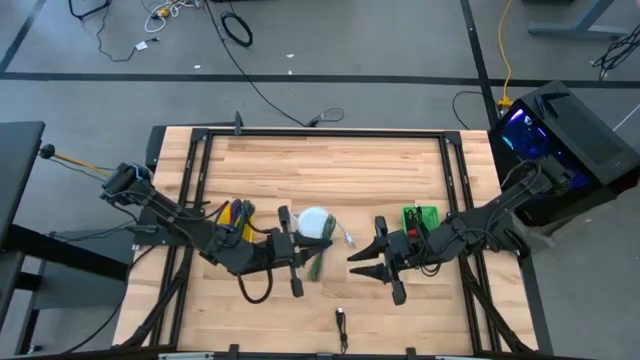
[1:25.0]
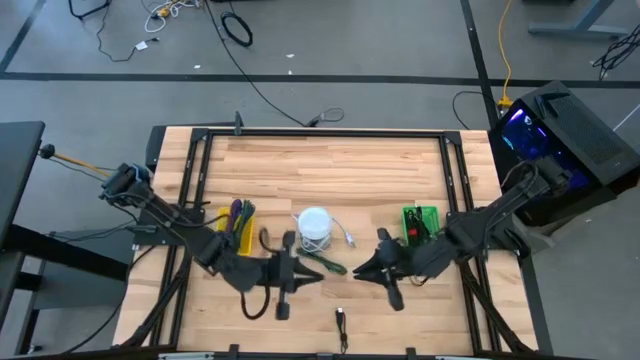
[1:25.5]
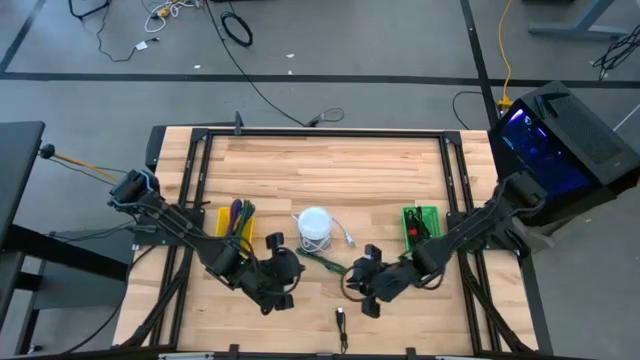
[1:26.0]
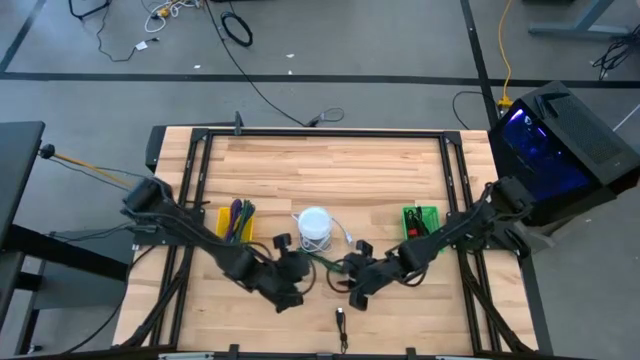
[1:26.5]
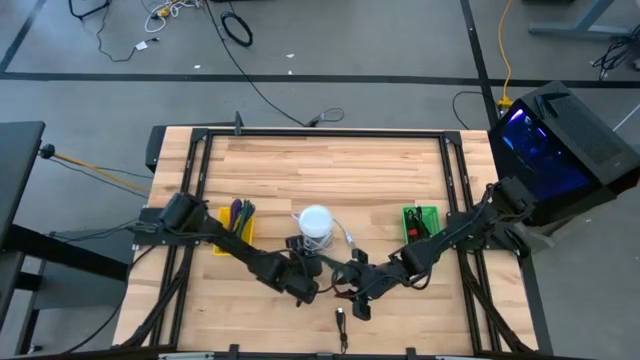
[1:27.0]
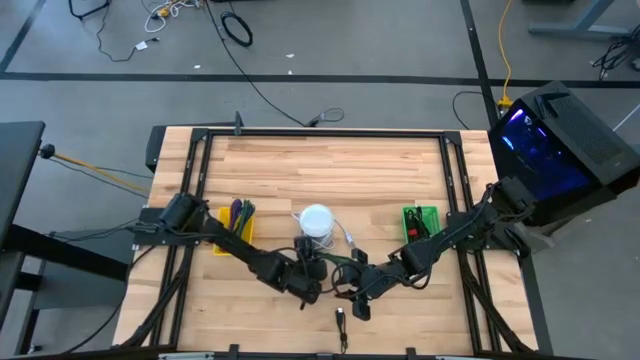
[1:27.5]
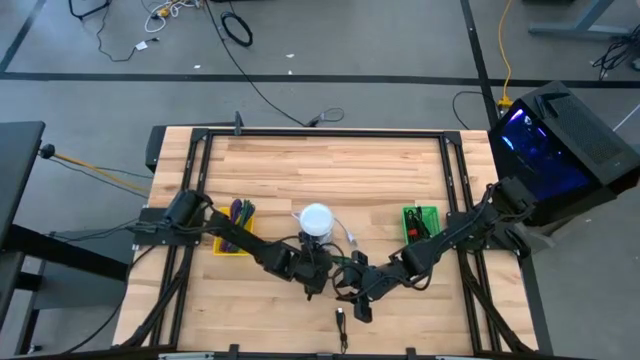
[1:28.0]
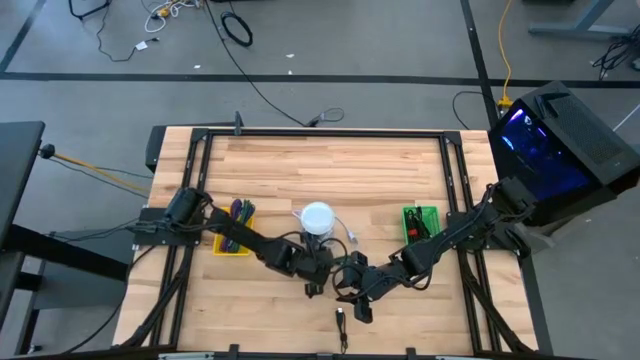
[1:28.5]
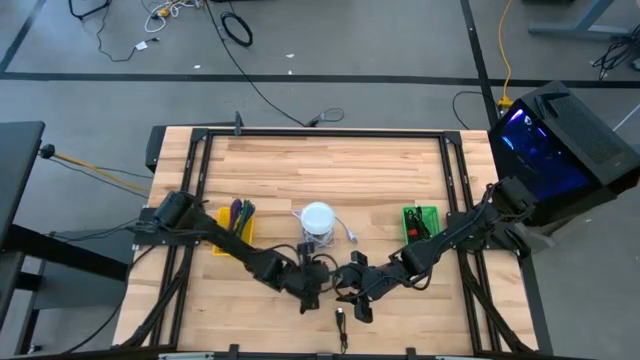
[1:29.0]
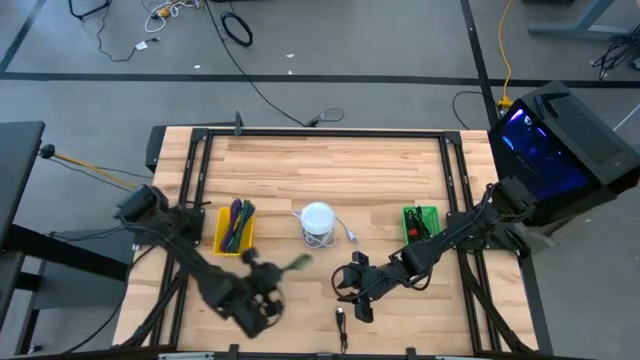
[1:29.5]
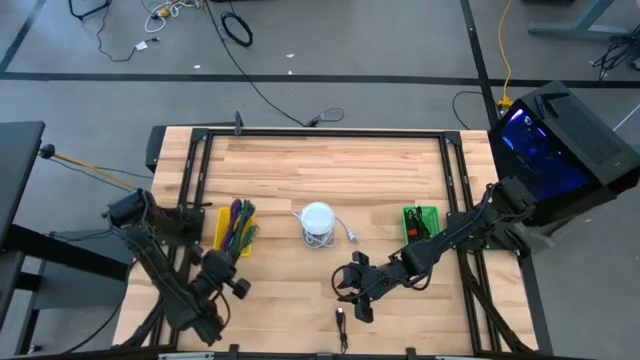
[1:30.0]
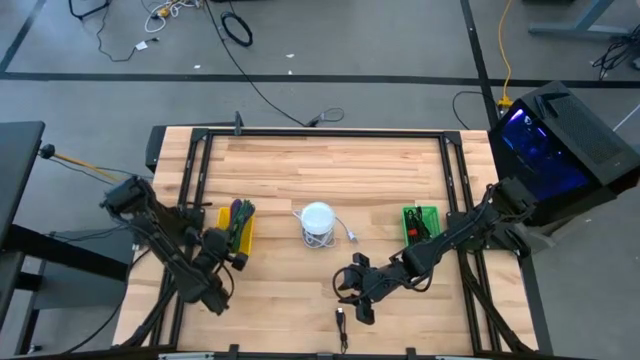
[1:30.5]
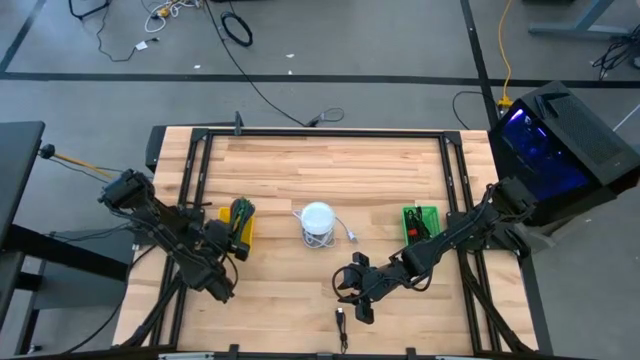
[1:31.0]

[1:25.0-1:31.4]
Task: Pick & Place USB Port
Put the green charger cable into the yellow bin

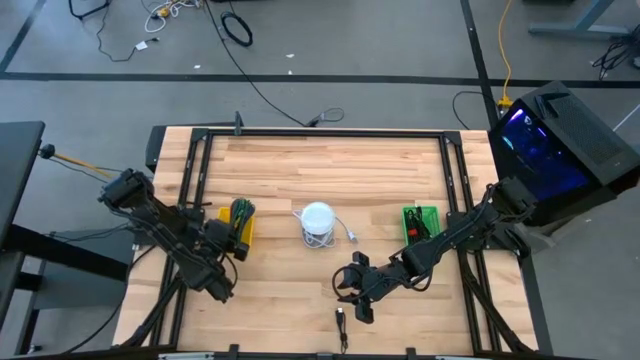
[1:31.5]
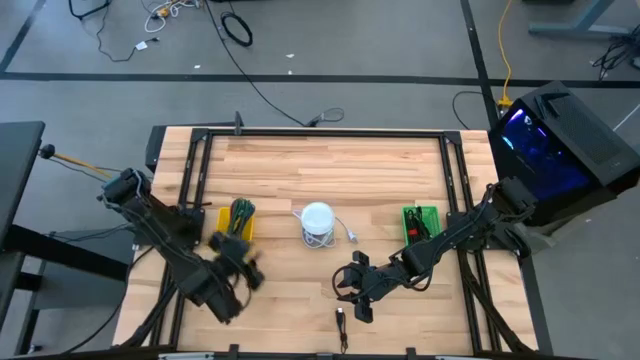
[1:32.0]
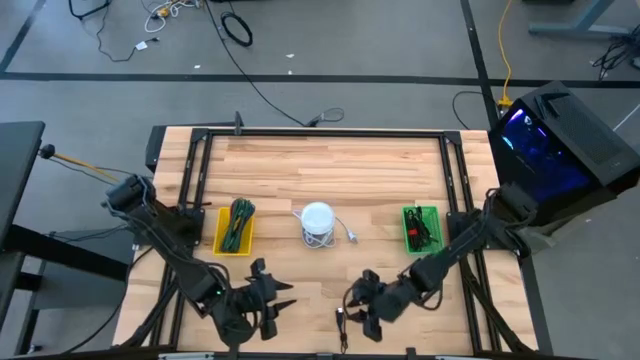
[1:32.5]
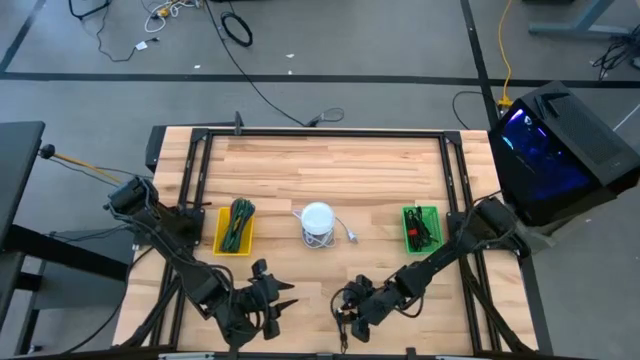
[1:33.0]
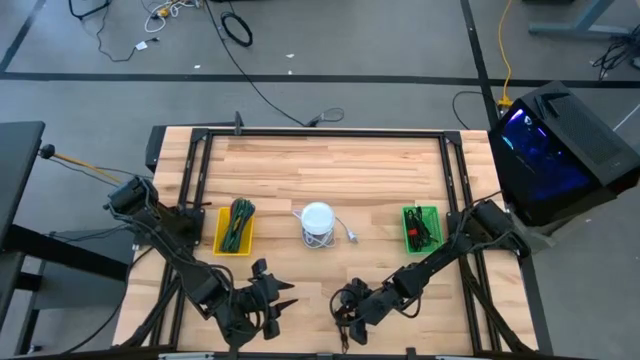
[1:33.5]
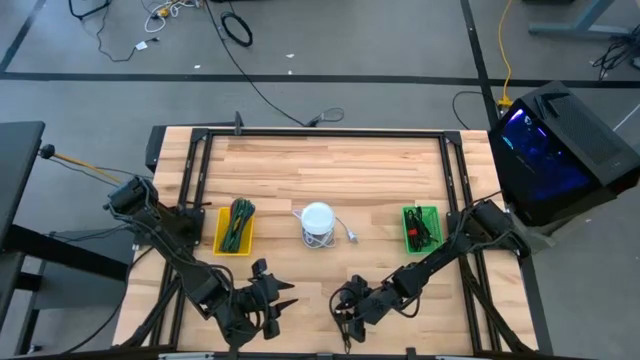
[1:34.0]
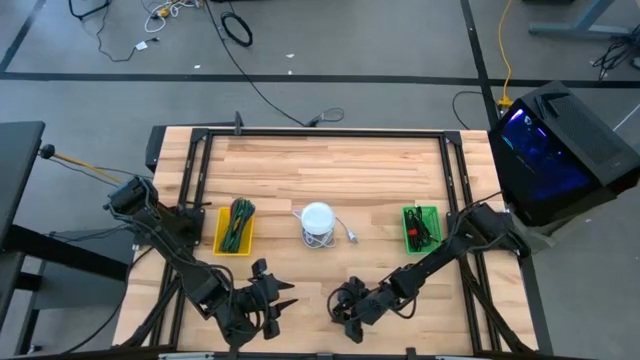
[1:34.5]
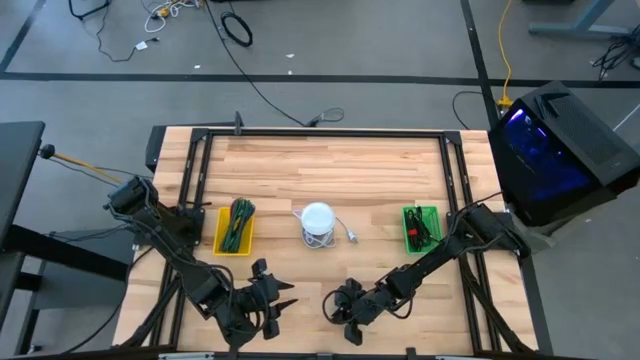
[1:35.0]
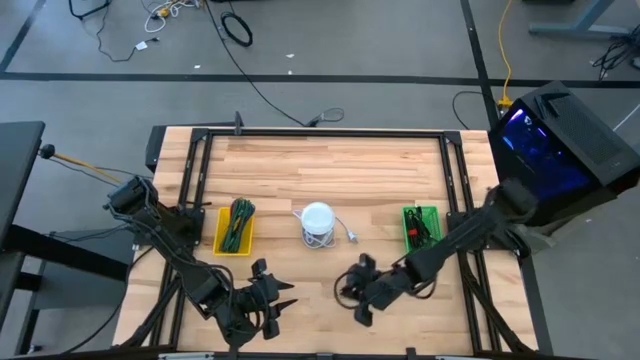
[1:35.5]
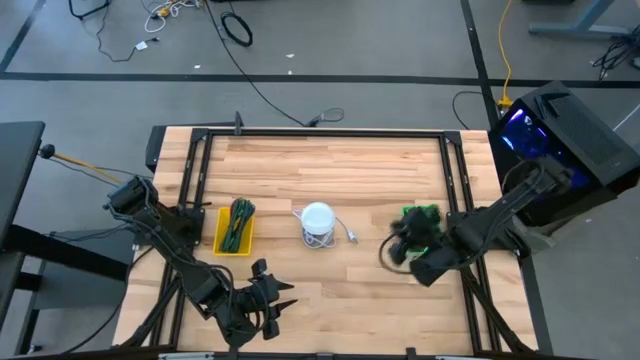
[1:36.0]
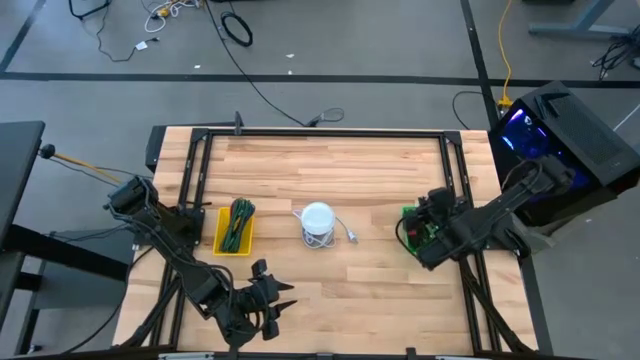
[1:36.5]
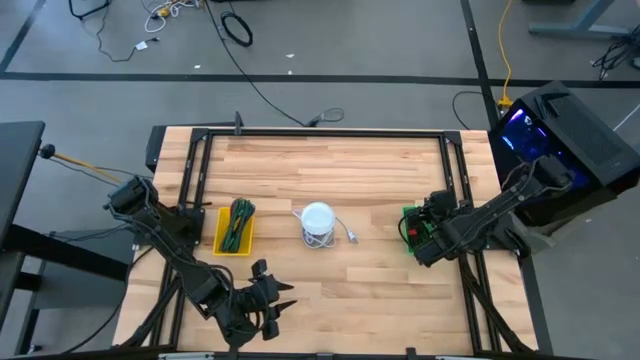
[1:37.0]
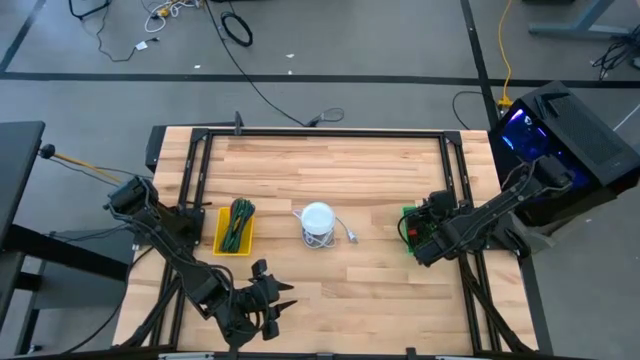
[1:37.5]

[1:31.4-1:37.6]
Put the black charger cable into the green bin

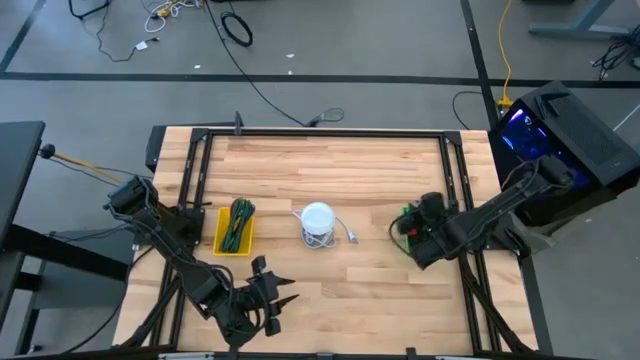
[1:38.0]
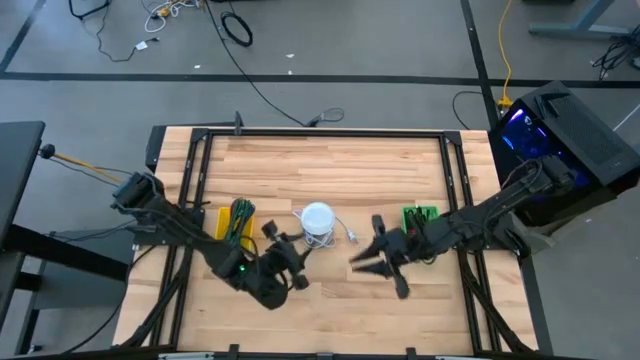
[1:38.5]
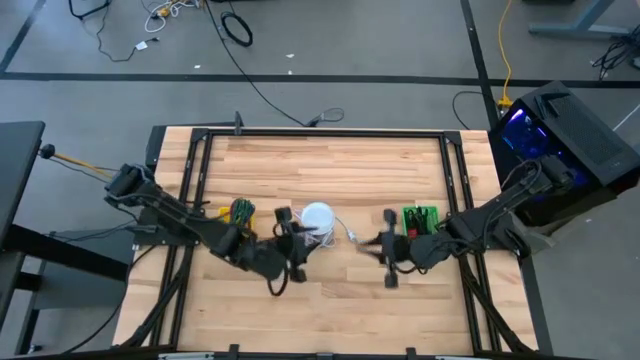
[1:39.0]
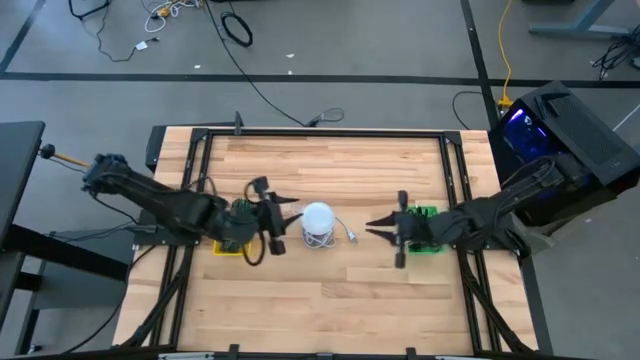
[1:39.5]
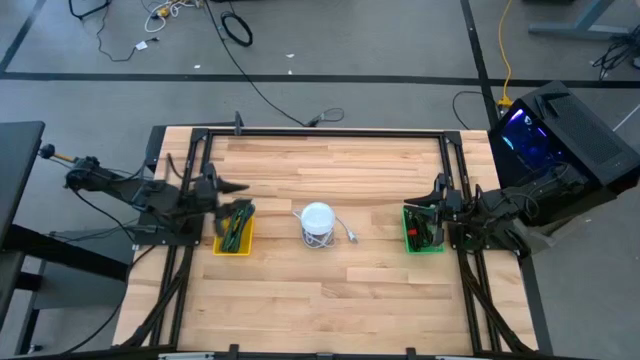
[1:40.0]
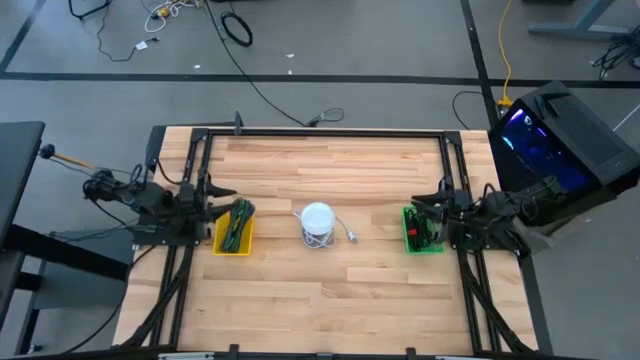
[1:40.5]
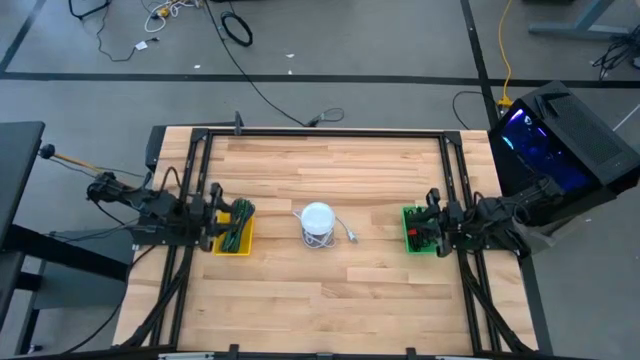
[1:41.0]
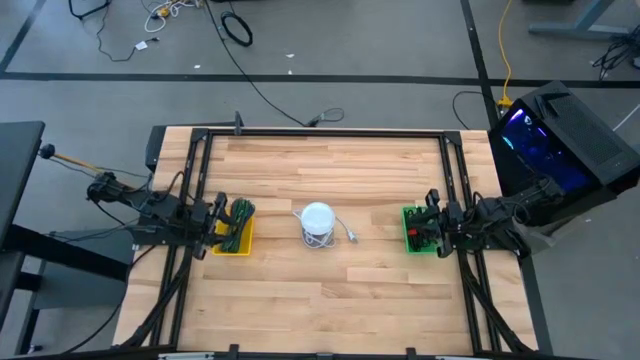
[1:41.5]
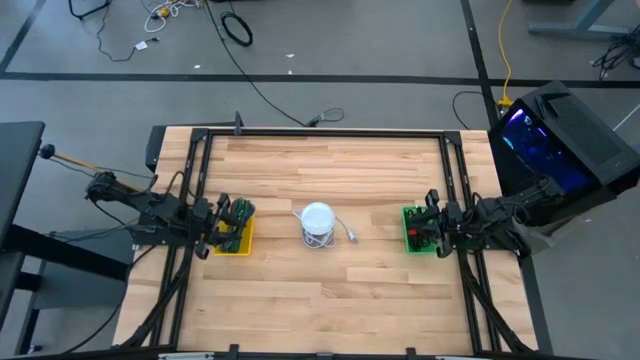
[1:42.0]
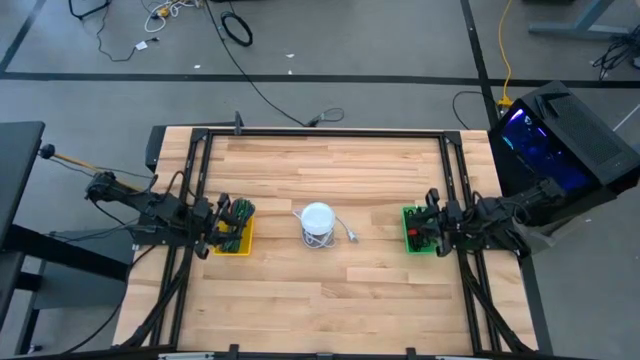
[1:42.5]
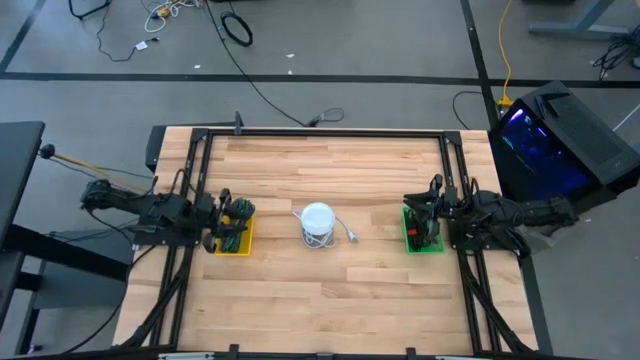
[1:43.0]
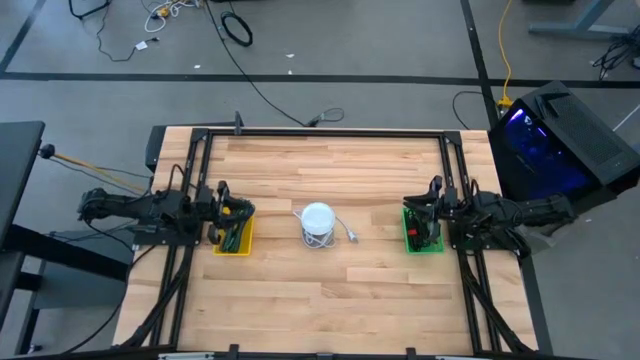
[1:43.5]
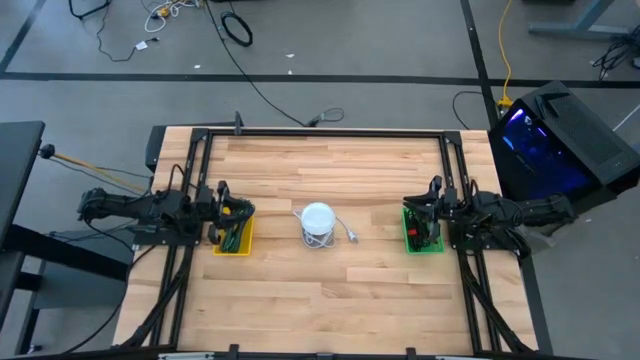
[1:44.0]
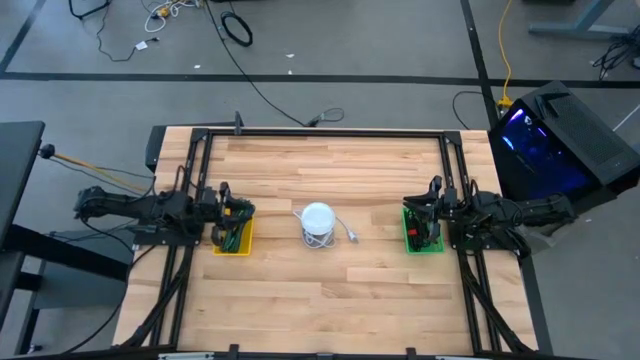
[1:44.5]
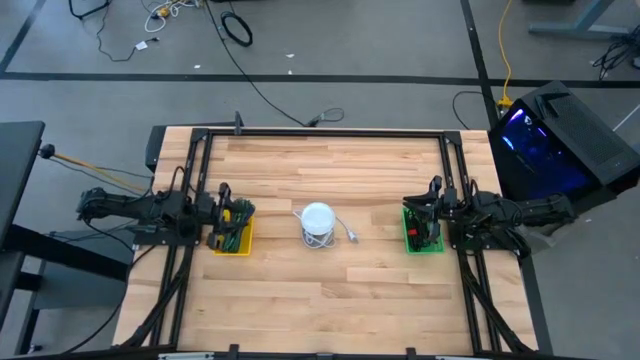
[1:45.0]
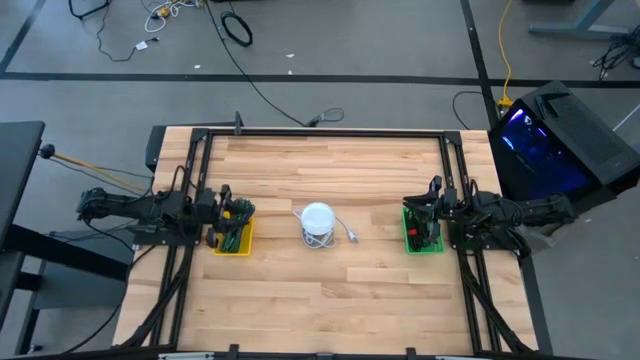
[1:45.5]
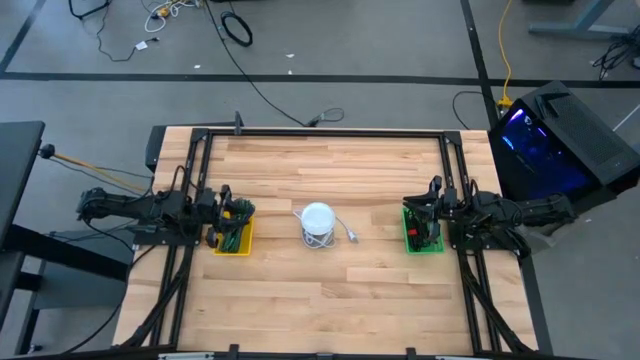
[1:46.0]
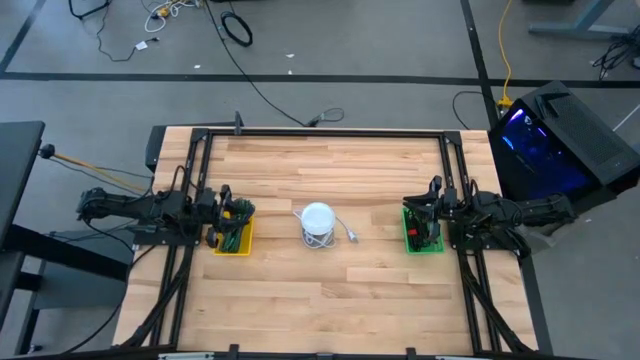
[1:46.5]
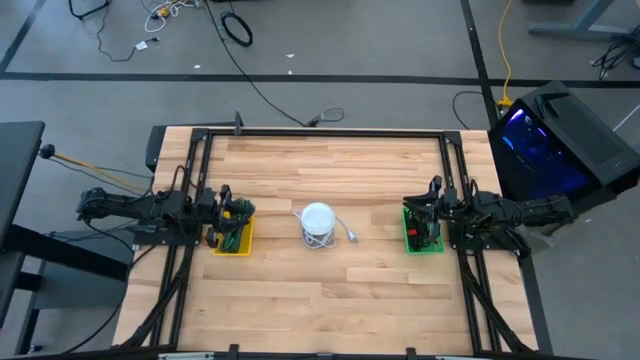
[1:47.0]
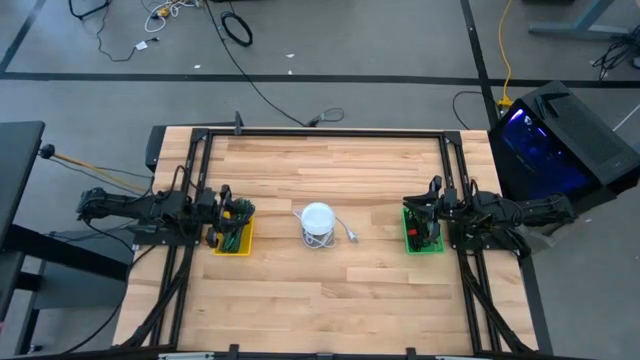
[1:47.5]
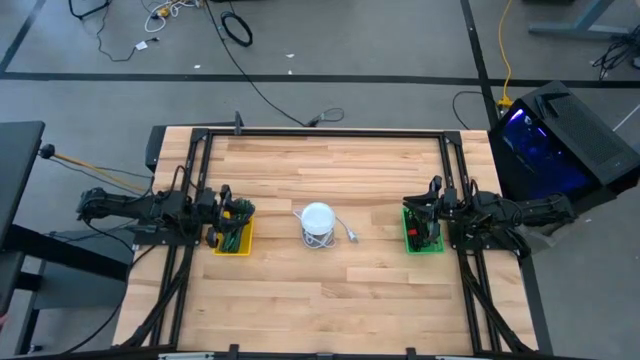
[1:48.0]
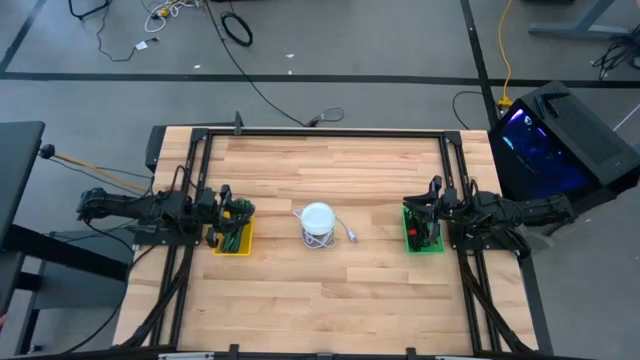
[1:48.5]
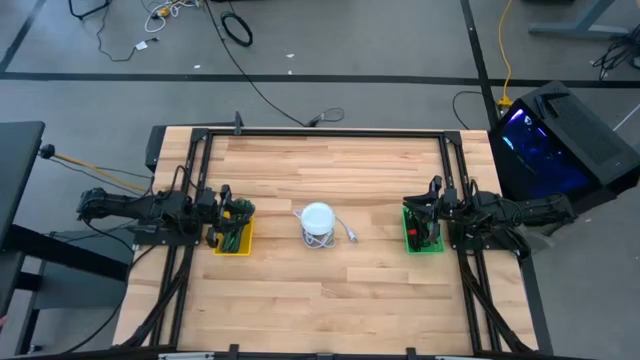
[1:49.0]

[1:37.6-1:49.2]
Return to Home Position
